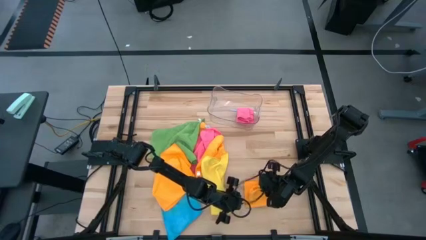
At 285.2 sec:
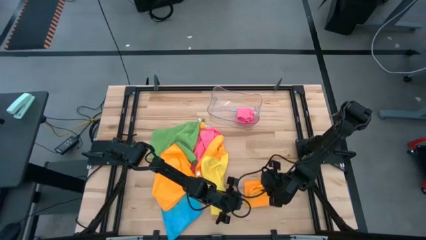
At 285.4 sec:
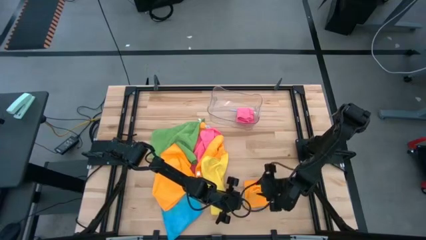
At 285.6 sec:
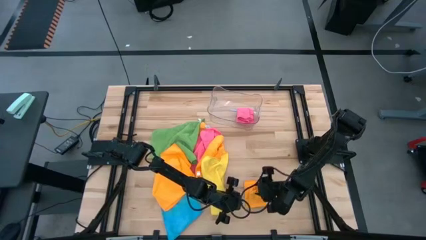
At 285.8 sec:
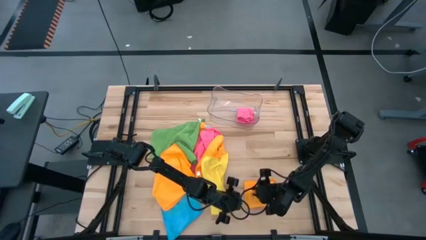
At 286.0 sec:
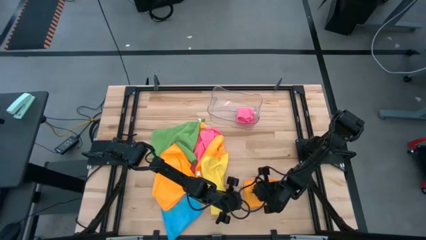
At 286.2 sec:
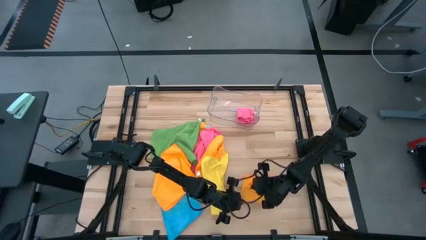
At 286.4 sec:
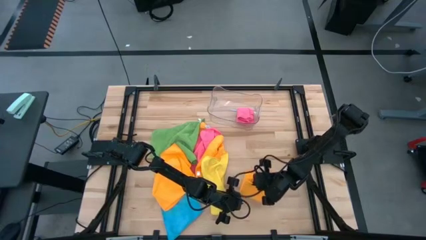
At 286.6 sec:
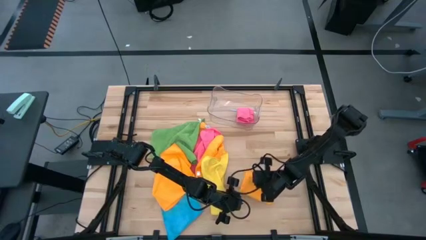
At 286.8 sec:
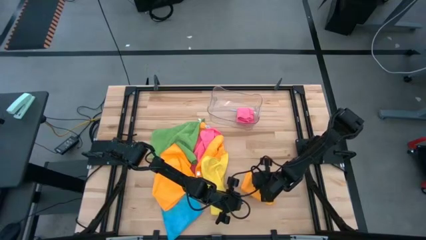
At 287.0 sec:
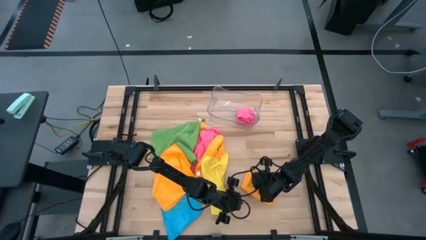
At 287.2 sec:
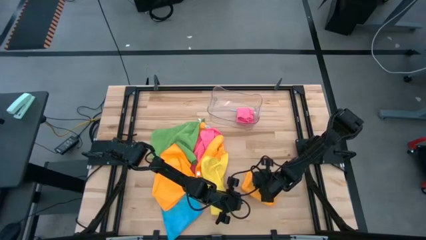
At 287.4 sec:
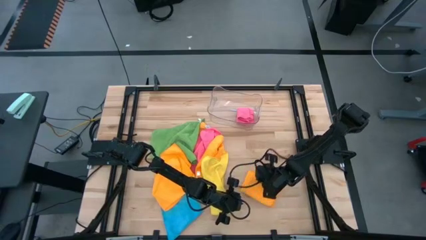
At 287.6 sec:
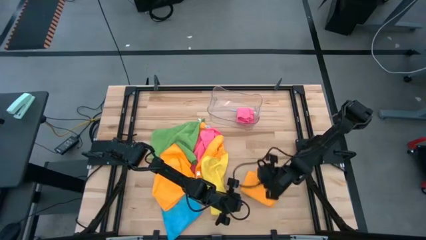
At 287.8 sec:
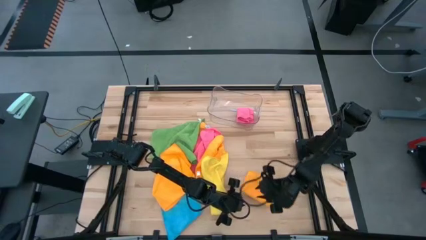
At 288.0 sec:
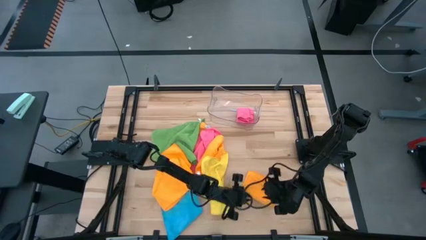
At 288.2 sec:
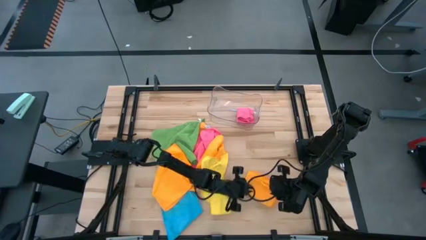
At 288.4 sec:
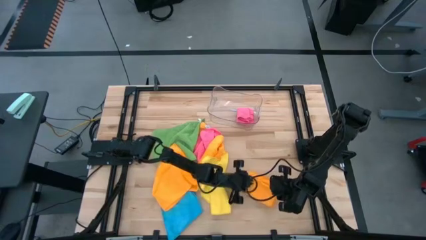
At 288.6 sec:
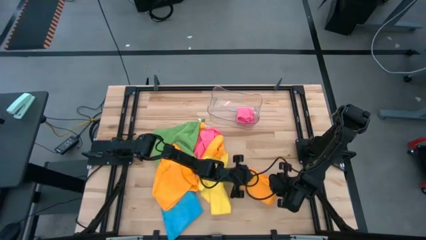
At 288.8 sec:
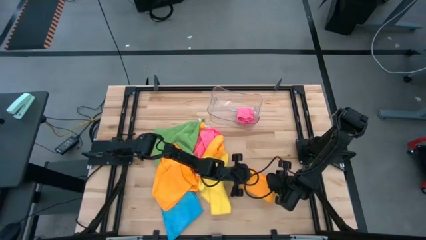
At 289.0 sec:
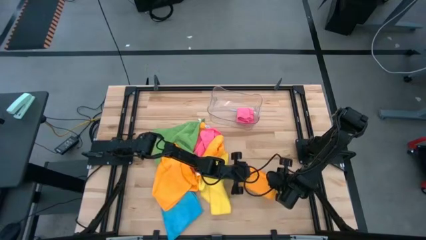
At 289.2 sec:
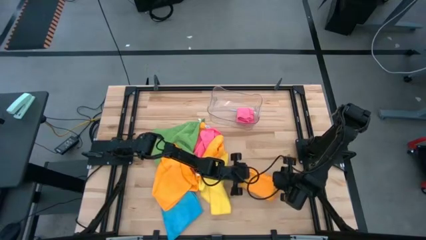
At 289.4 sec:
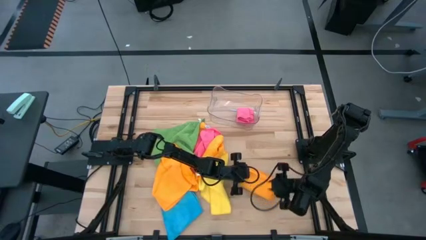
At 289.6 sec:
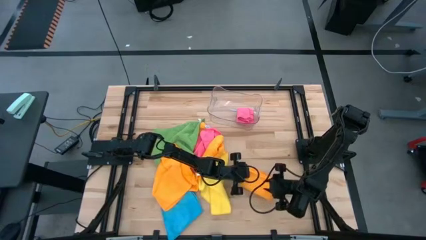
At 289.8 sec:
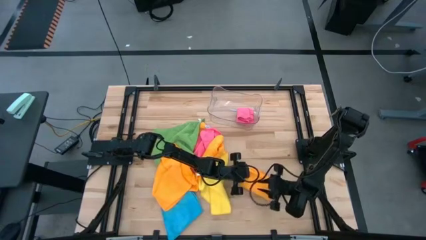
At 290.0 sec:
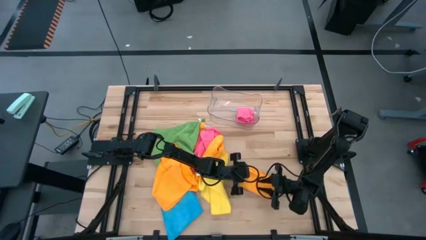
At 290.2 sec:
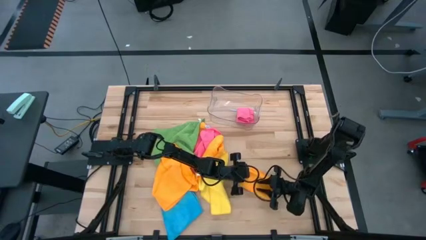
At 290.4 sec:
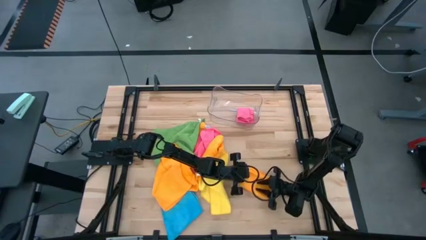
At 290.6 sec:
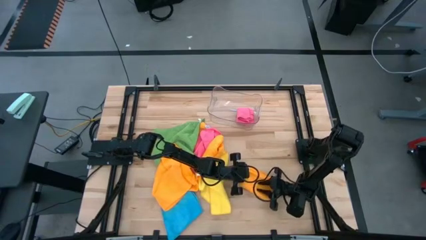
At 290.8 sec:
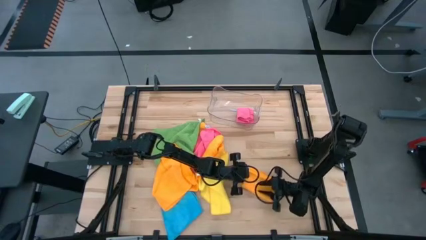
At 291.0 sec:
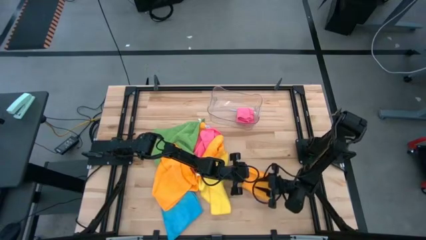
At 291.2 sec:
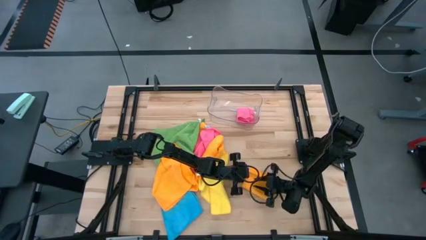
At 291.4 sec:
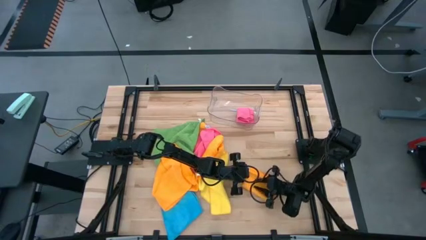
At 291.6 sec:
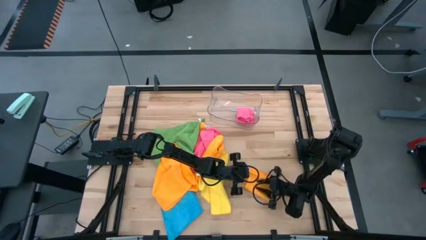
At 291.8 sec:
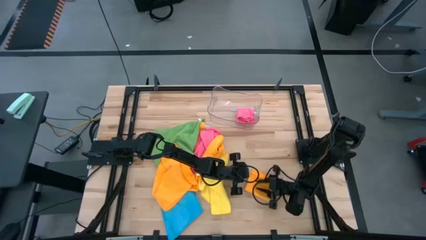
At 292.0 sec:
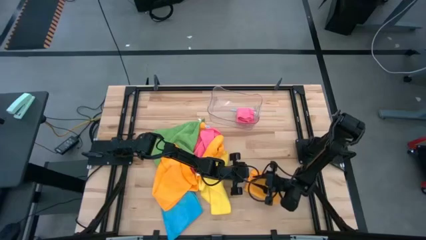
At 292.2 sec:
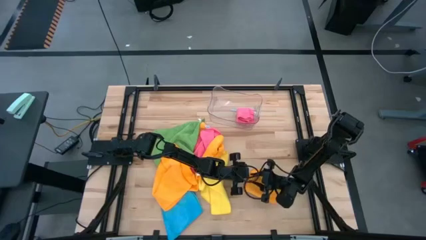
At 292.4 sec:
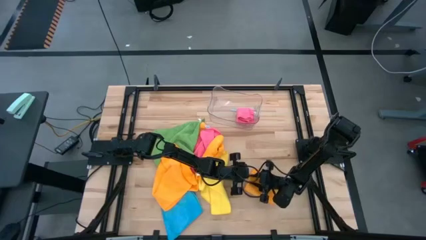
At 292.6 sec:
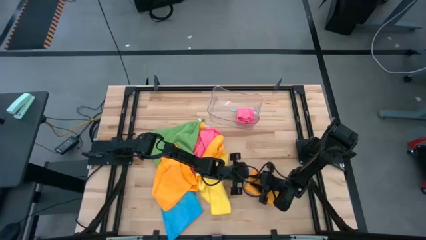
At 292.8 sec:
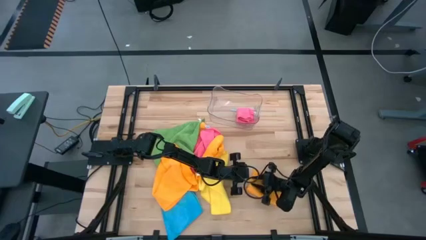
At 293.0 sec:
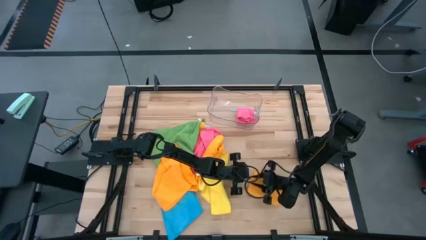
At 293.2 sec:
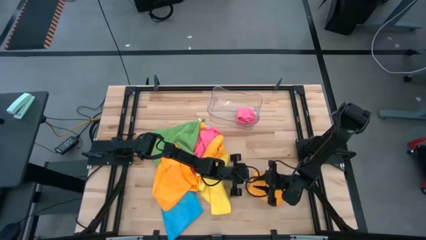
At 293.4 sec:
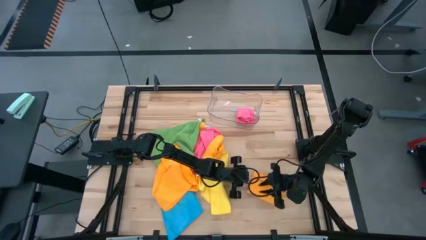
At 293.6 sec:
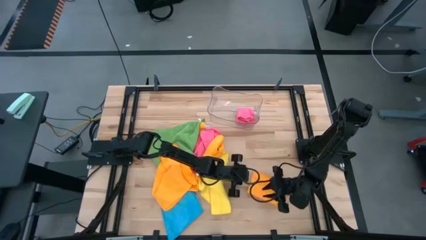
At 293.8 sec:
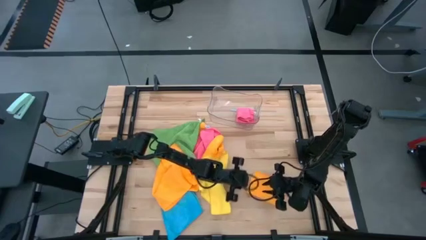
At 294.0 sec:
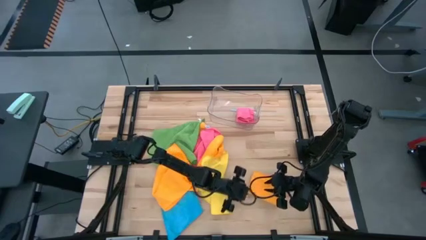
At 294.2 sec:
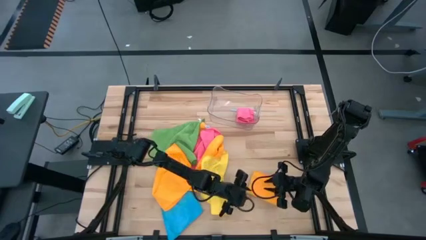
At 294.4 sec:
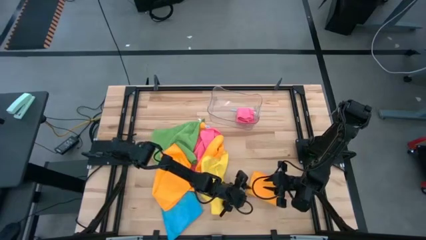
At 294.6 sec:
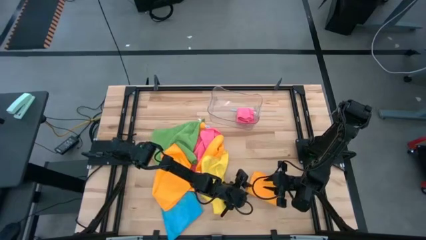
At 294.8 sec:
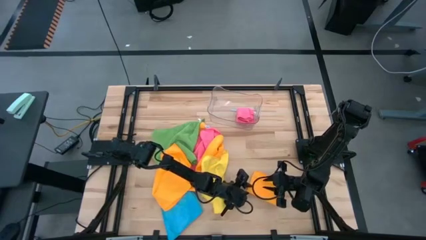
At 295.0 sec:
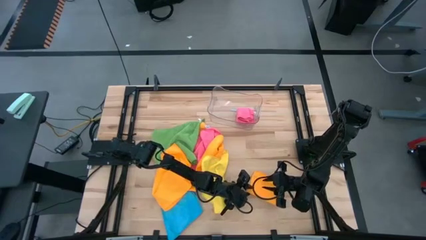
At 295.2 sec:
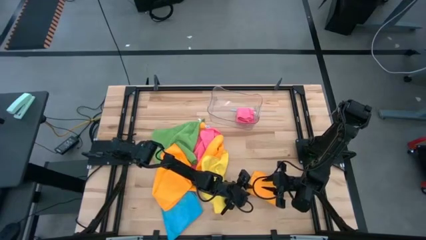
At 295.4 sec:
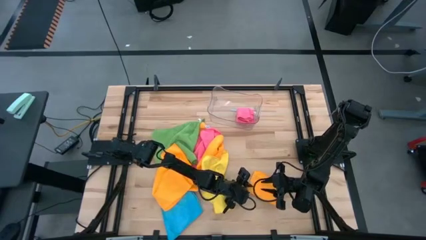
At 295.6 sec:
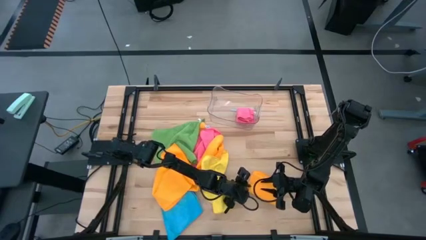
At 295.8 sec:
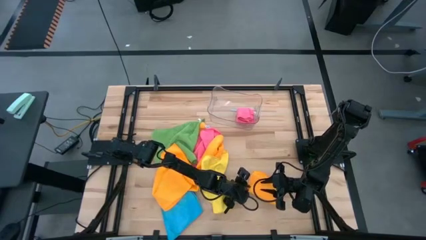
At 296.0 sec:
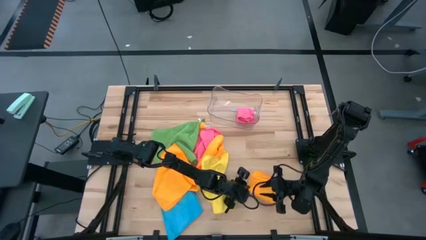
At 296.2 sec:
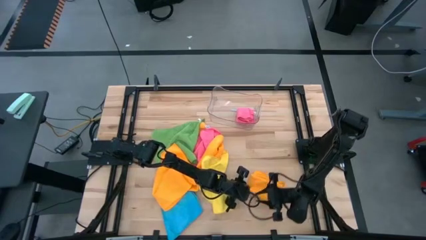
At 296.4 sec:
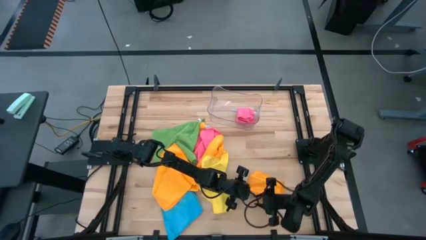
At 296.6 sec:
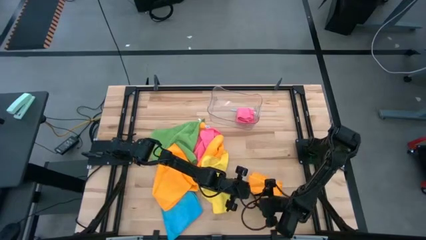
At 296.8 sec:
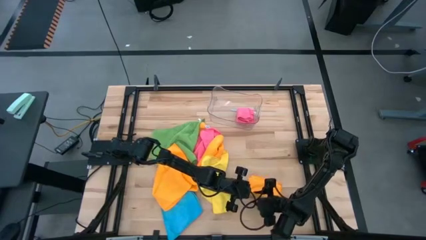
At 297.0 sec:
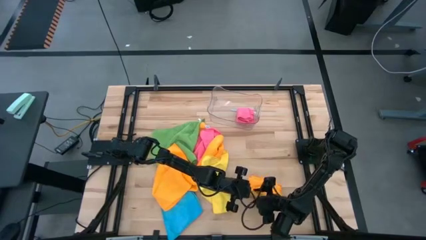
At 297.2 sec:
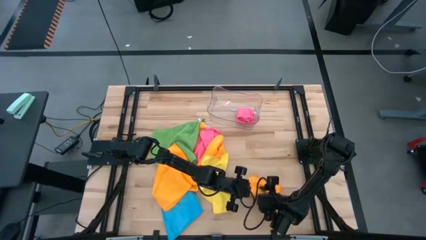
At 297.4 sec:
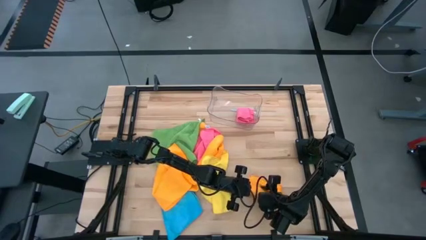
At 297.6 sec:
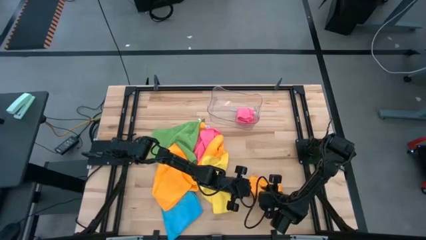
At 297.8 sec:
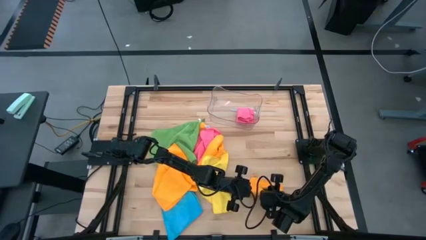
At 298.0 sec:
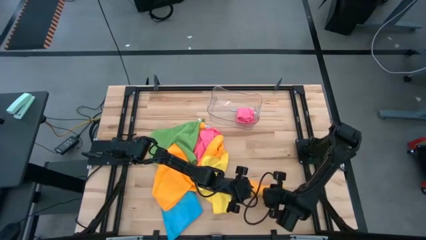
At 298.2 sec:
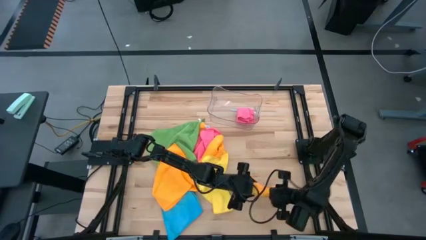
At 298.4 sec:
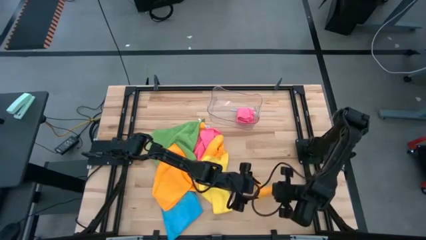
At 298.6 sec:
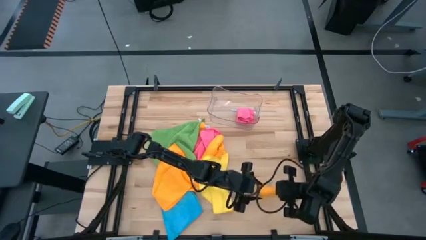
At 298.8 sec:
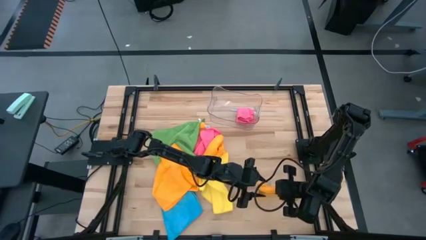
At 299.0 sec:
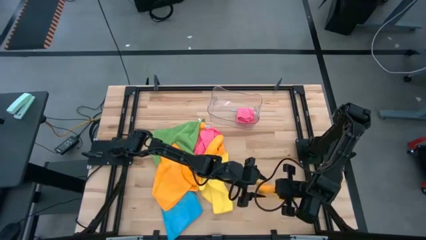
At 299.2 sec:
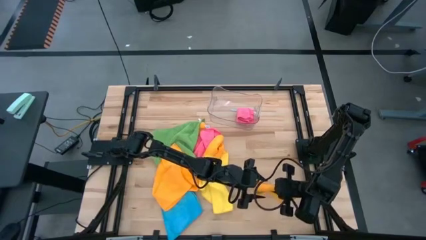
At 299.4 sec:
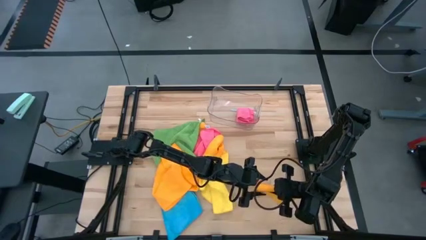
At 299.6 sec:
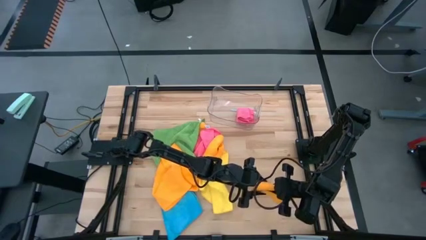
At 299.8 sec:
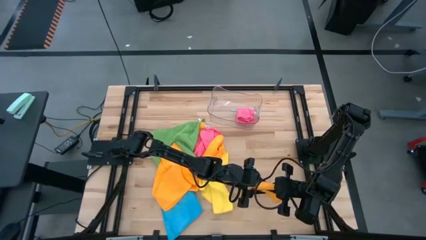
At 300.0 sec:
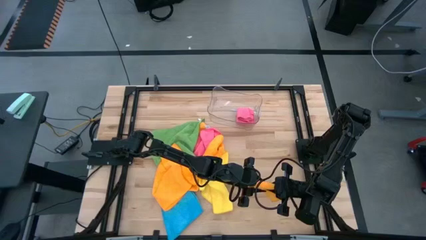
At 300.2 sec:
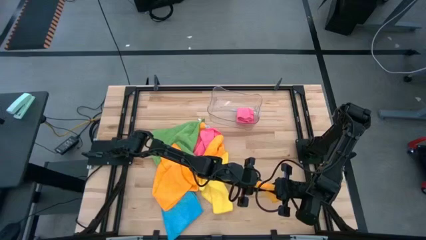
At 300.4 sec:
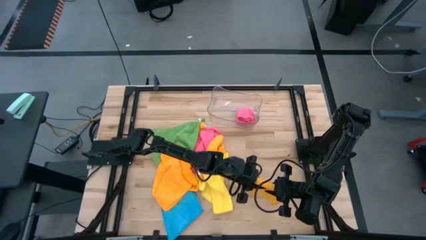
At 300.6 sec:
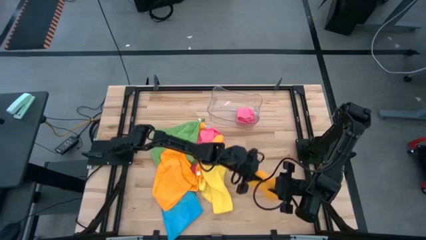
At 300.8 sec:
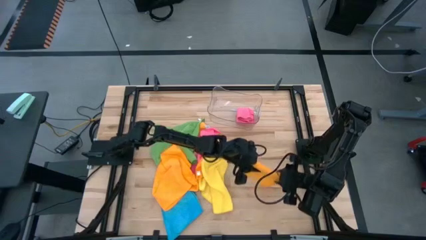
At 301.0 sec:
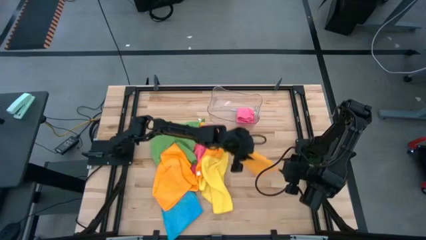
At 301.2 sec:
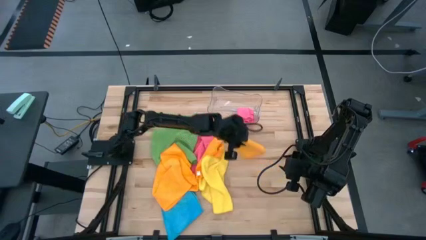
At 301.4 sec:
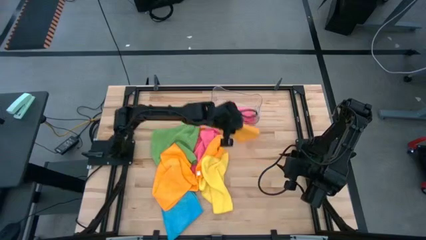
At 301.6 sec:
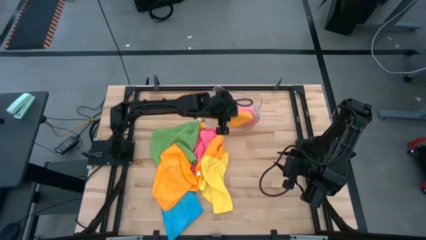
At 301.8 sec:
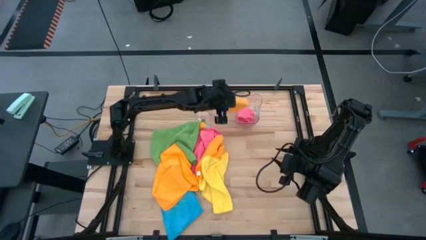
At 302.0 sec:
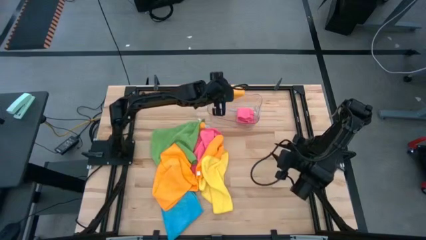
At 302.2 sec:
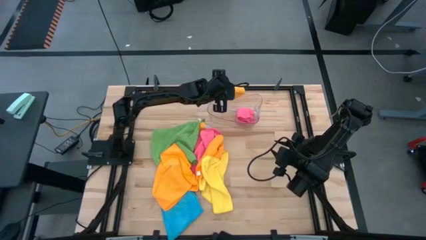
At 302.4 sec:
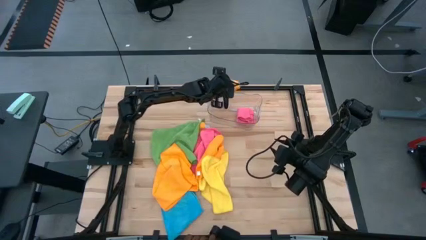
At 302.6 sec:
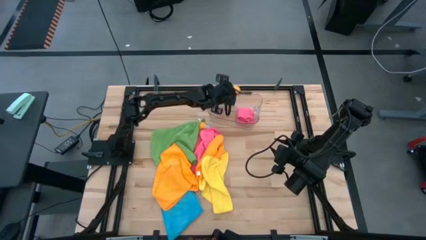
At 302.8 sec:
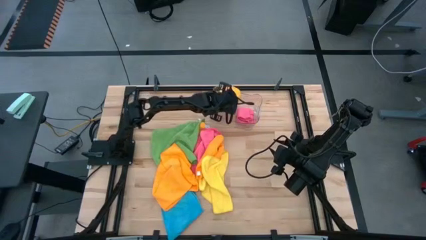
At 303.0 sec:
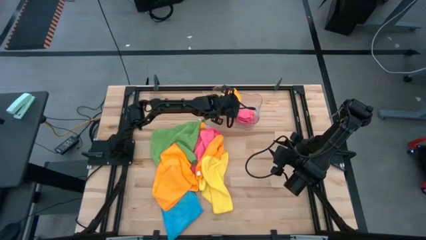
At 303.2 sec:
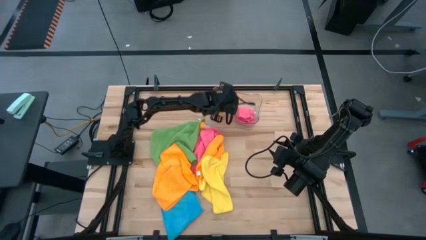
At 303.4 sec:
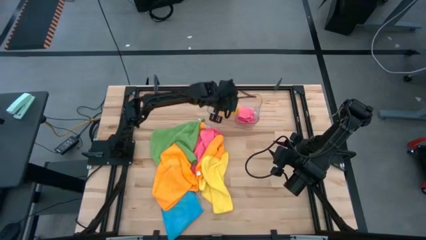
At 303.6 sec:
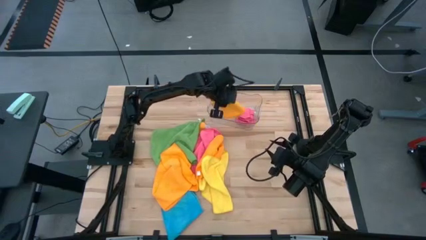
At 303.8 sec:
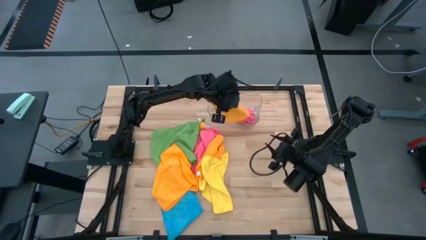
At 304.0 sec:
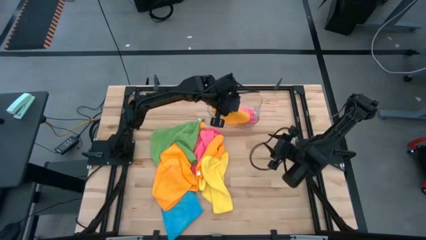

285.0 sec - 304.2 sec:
Task: Fold microfiber towels
Fold the right orange microfiber cloth
